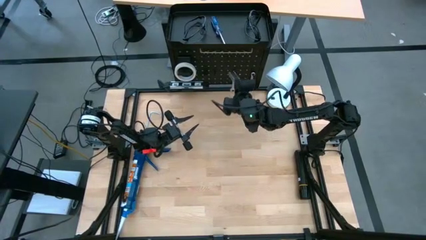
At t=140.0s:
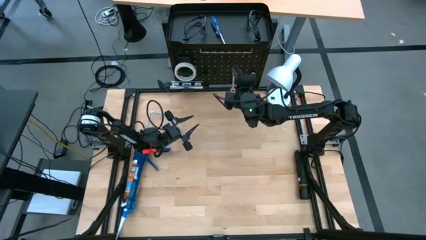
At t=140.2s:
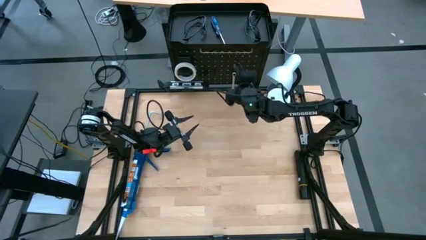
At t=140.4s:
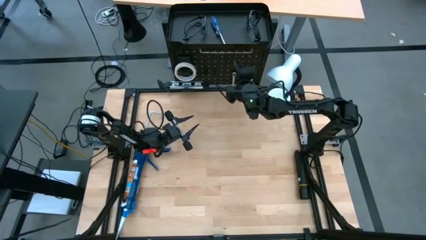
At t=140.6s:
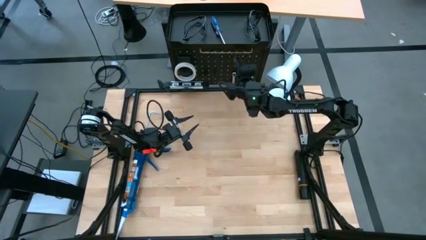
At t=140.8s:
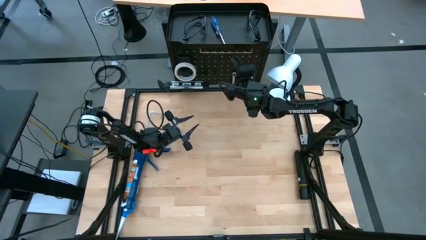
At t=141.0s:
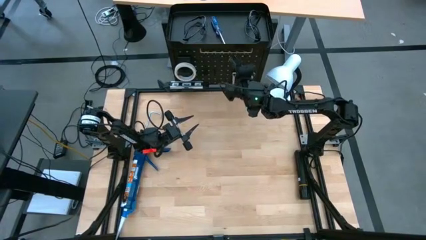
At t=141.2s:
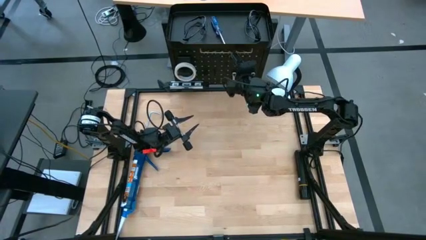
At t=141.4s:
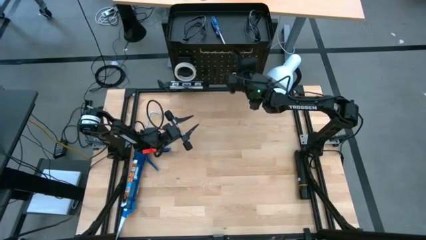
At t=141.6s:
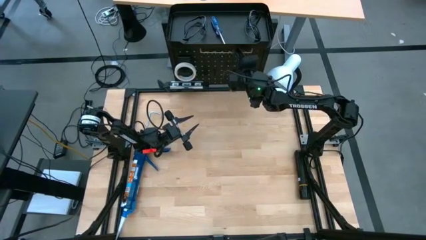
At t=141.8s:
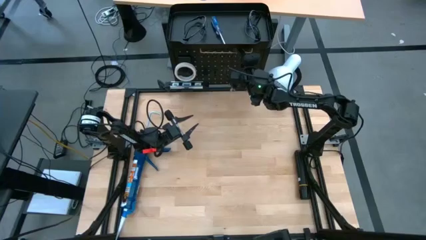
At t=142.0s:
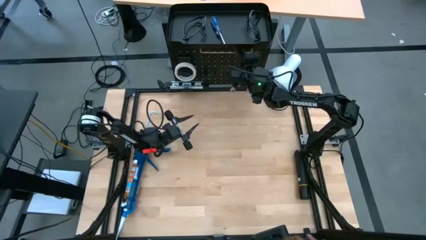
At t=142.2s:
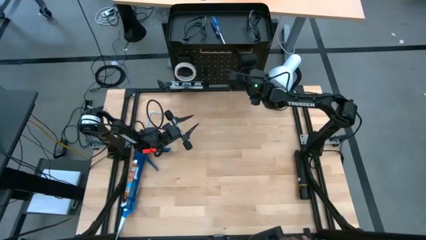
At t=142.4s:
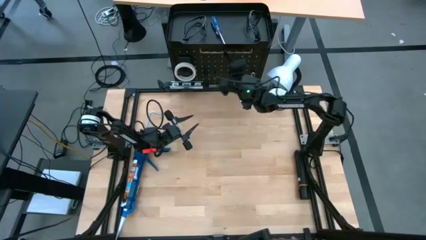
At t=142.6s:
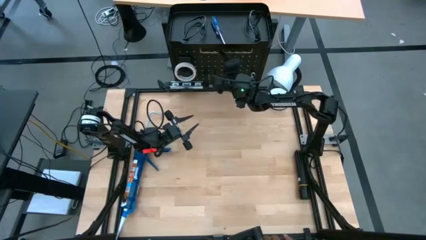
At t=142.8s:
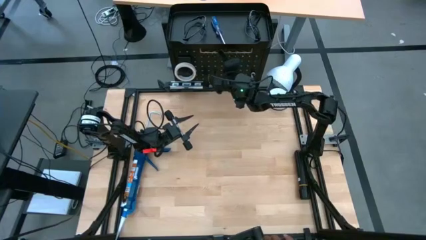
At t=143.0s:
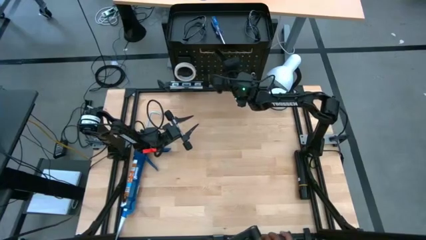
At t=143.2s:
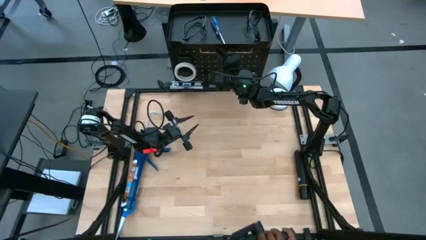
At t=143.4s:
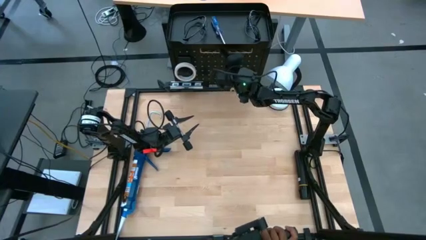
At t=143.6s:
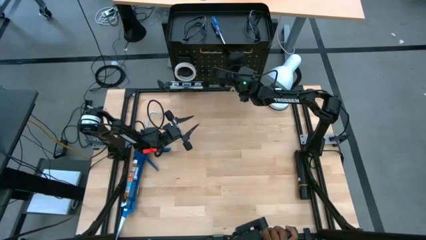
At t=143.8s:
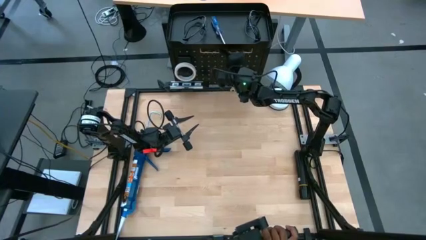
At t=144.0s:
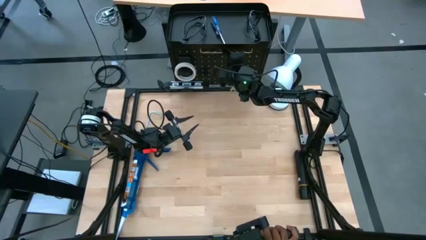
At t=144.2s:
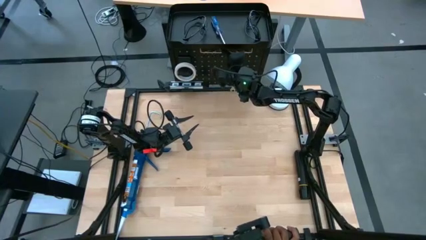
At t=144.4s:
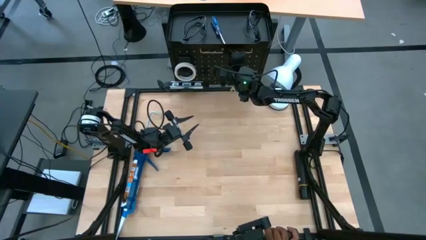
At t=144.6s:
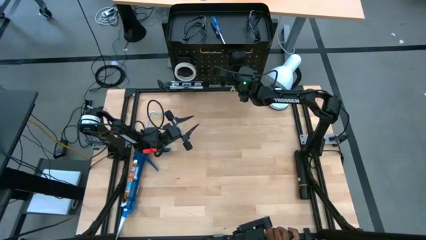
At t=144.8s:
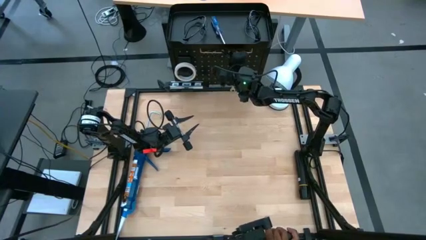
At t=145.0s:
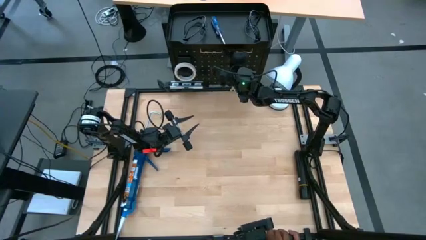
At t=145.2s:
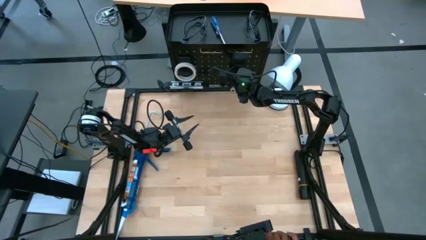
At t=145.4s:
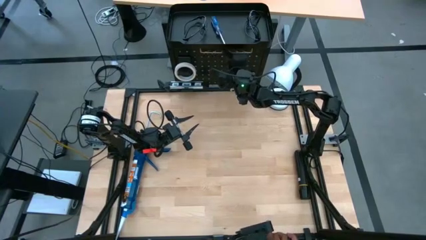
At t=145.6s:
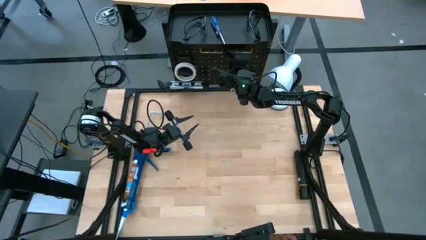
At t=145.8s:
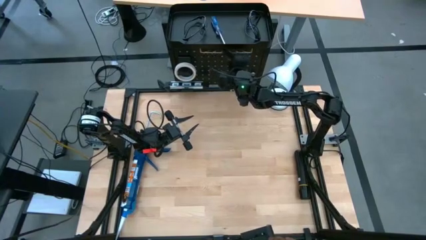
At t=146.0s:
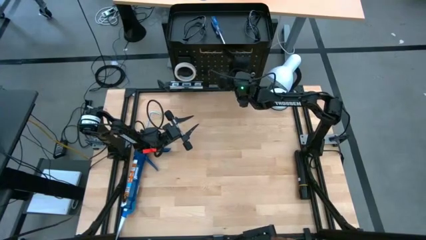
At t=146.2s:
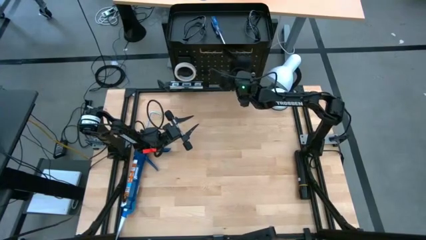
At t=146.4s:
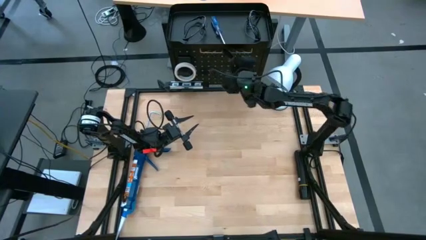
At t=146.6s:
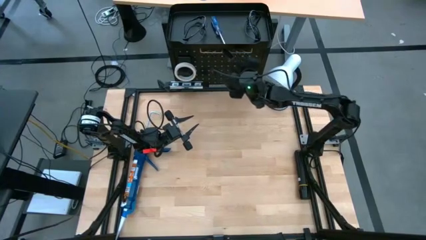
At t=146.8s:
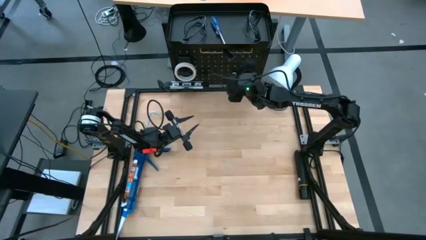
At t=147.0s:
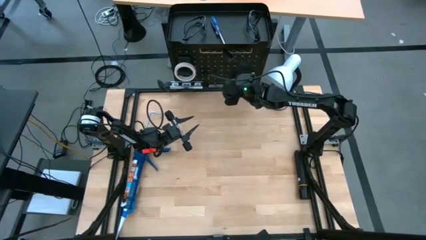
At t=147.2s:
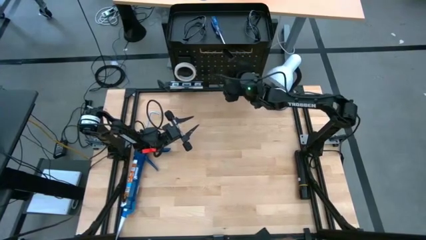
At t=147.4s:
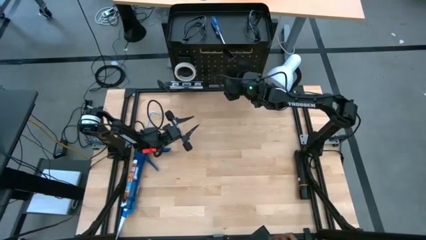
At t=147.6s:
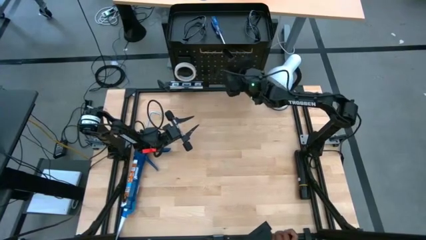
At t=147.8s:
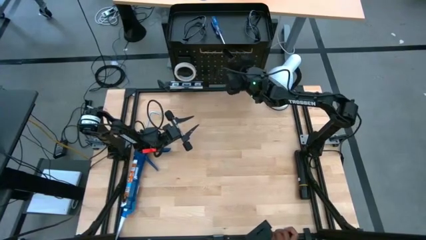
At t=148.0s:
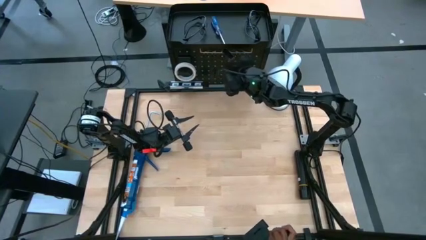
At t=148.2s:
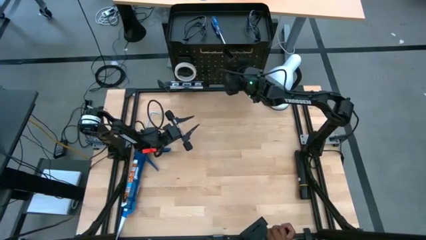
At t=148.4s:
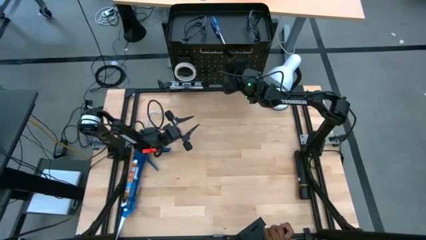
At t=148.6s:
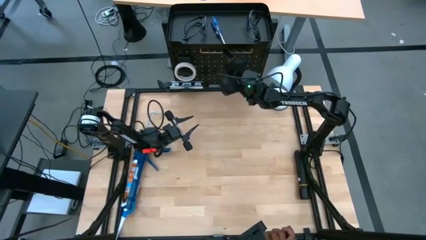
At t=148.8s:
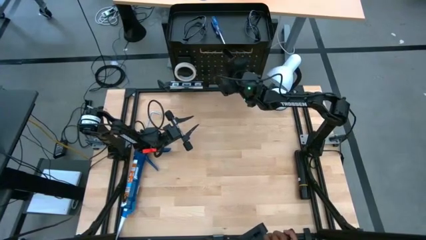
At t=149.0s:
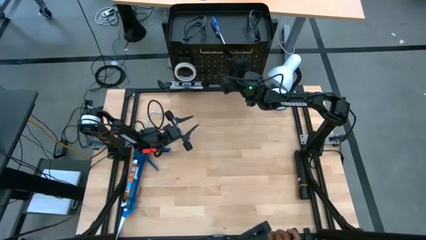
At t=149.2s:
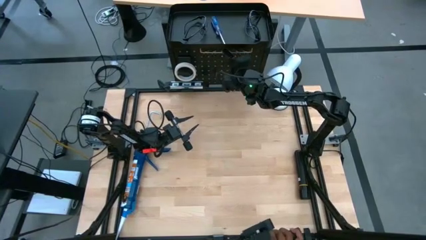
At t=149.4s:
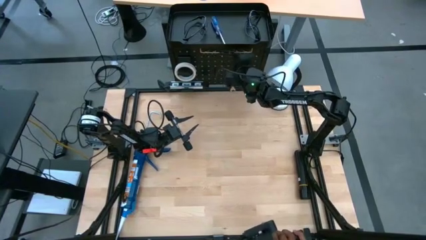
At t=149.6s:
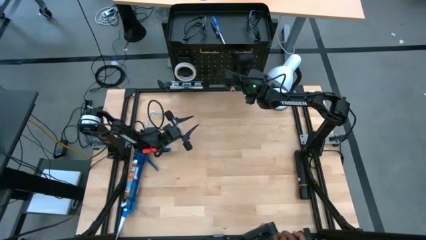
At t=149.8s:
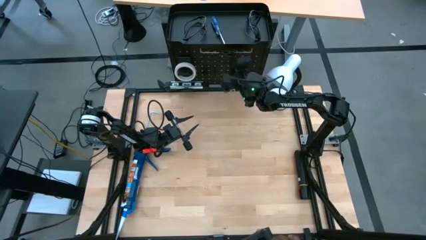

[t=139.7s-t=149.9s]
Task: Hang tools onto peg board
Hang the rectangular tool on the pegboard
